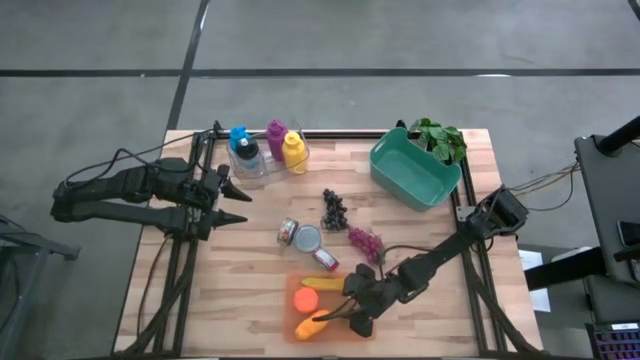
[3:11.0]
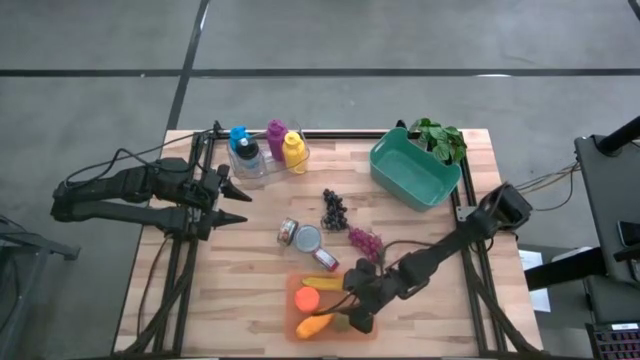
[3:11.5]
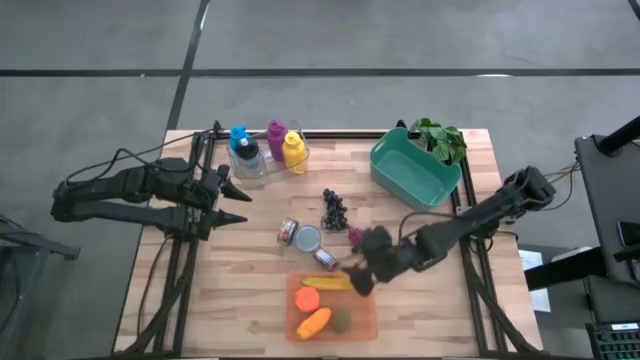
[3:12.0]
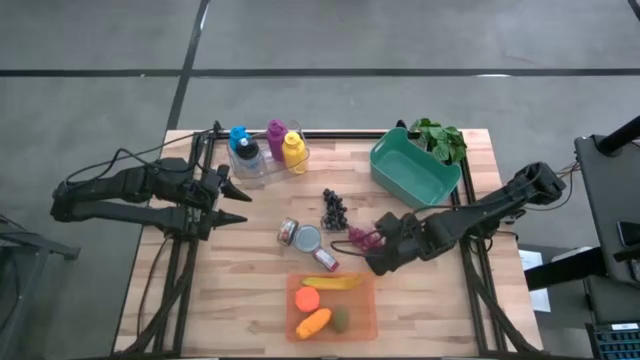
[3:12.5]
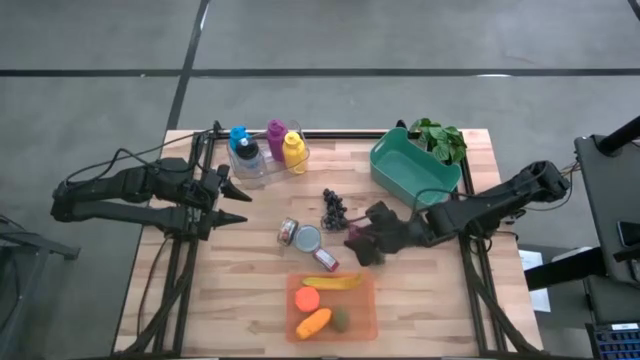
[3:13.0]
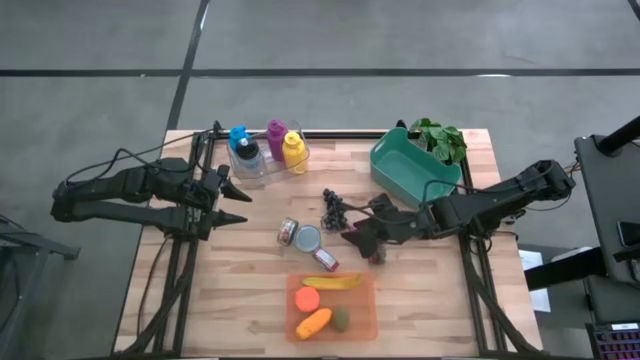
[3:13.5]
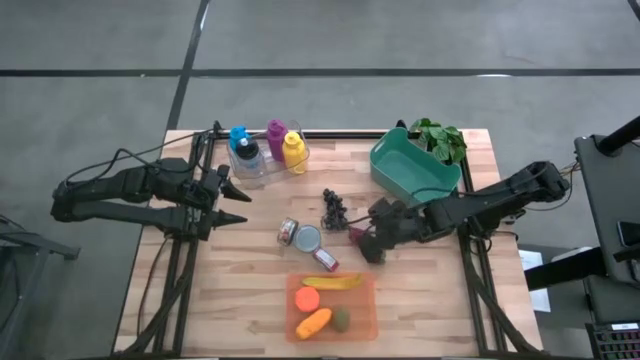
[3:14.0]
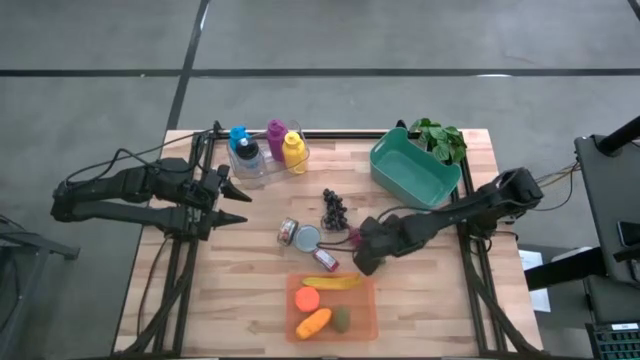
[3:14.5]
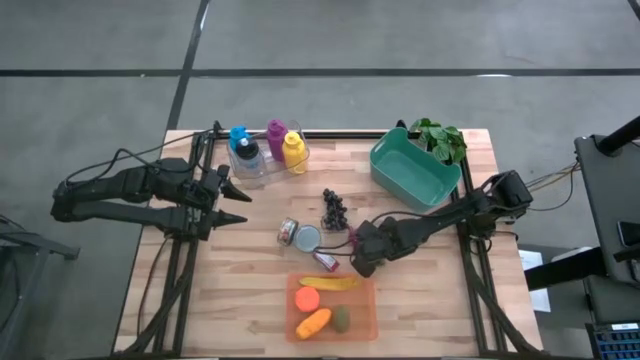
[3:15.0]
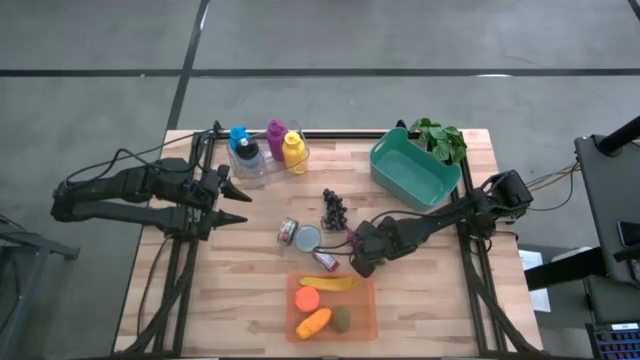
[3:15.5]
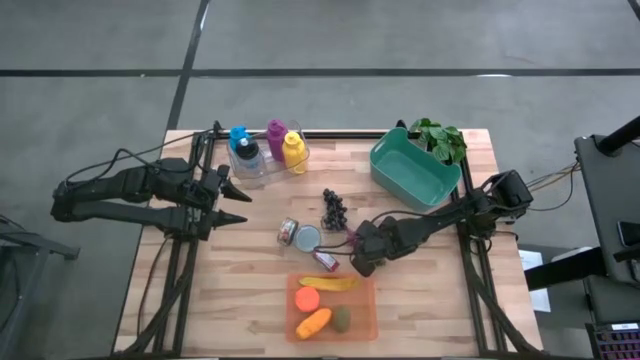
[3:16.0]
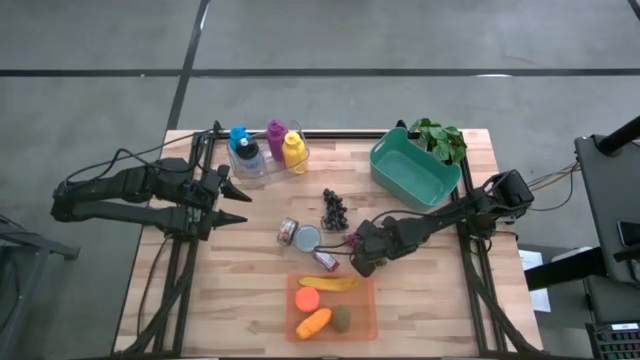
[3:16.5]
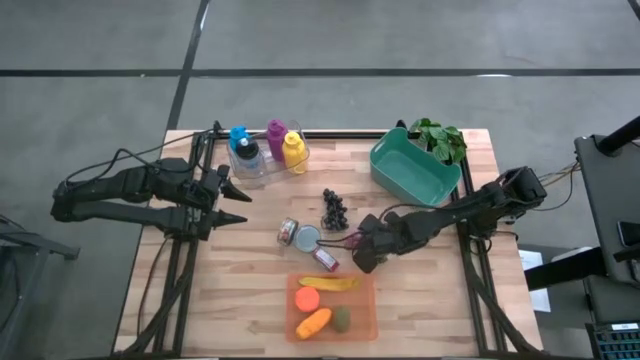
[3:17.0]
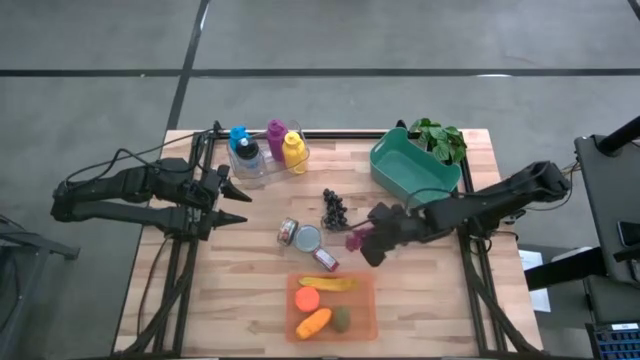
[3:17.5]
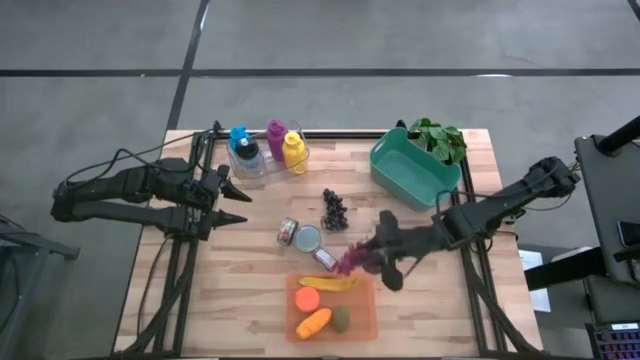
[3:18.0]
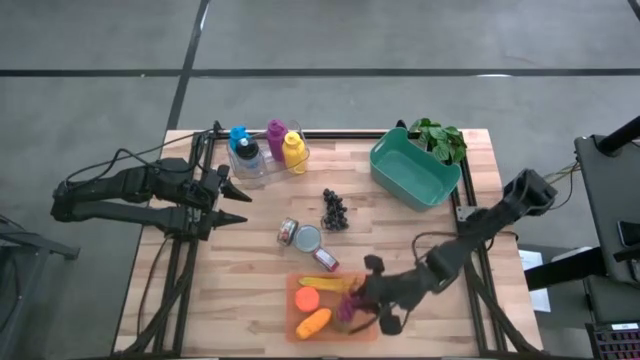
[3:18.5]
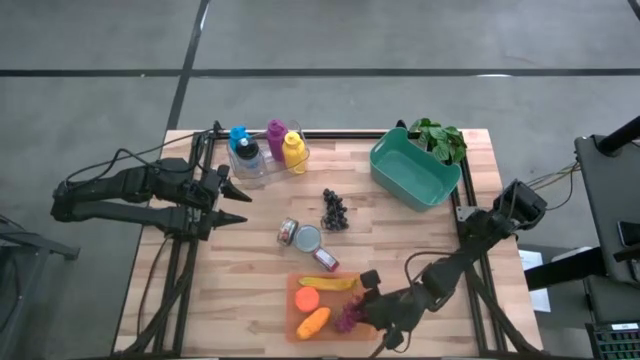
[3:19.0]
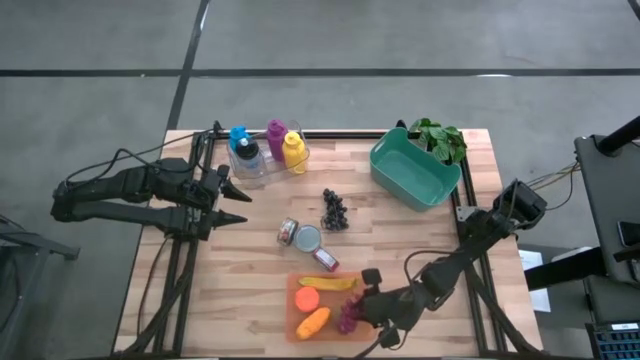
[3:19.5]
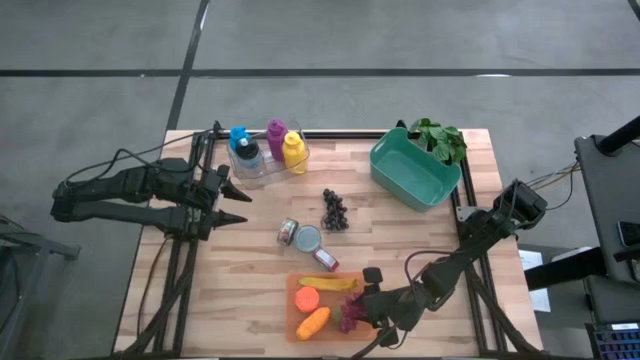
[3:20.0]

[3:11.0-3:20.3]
Task: Pick & Place Food Item
Put the pink grapes into the orange bin

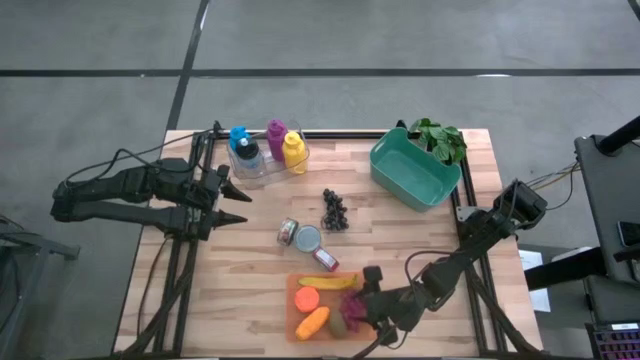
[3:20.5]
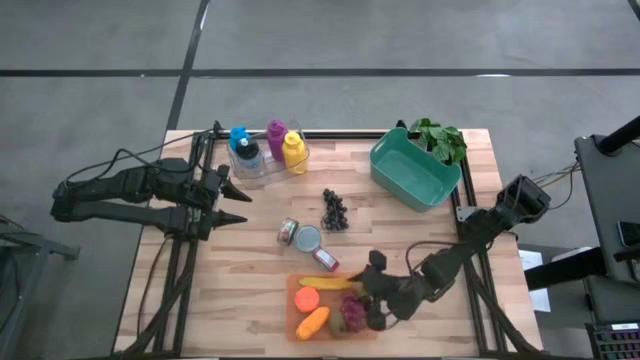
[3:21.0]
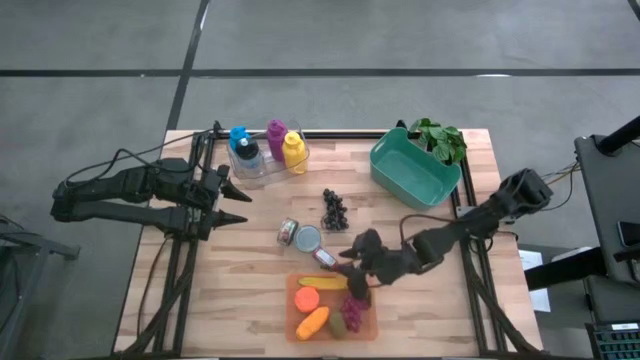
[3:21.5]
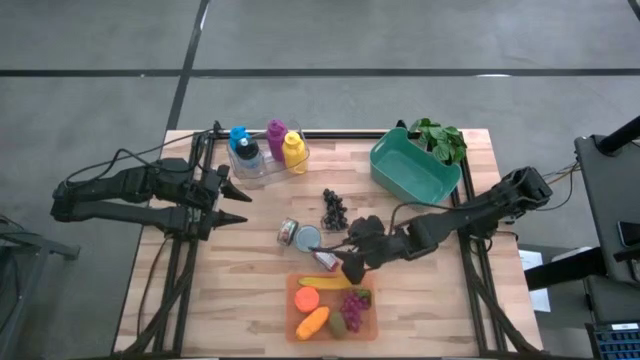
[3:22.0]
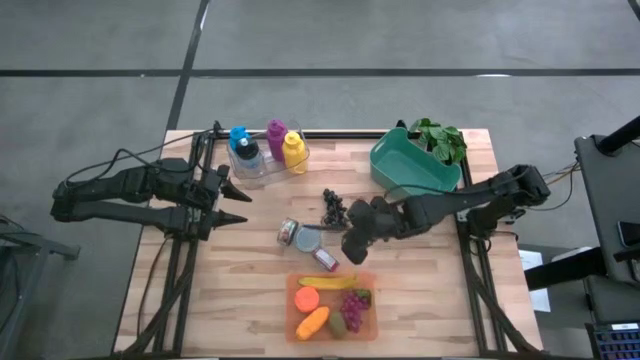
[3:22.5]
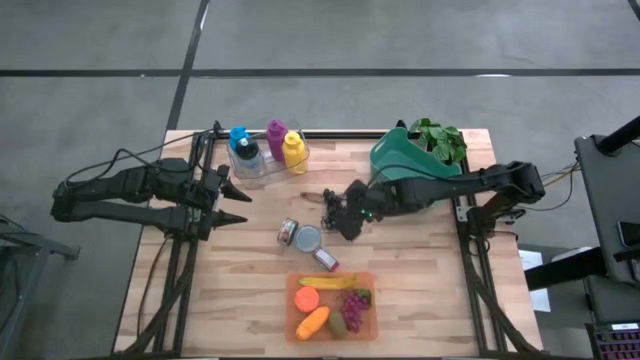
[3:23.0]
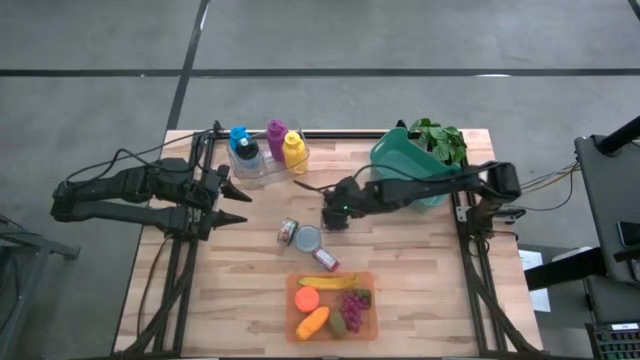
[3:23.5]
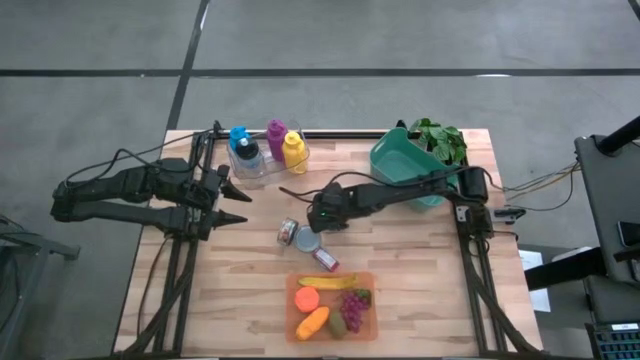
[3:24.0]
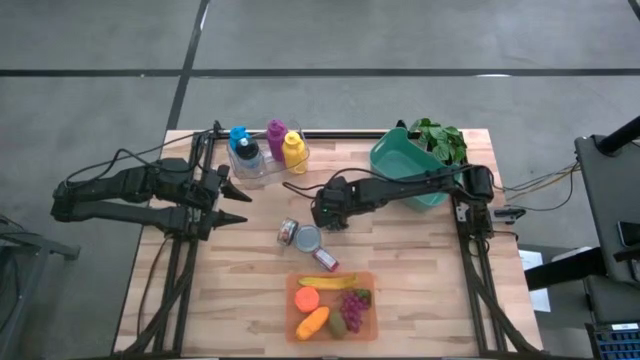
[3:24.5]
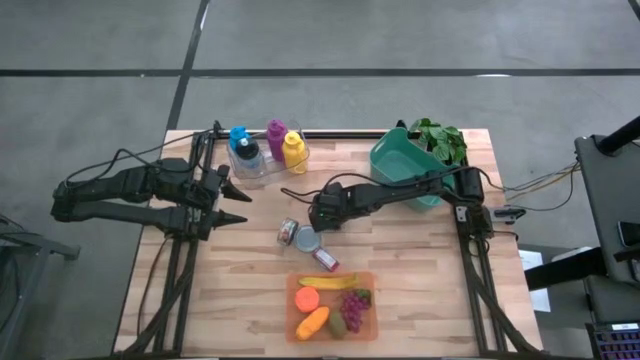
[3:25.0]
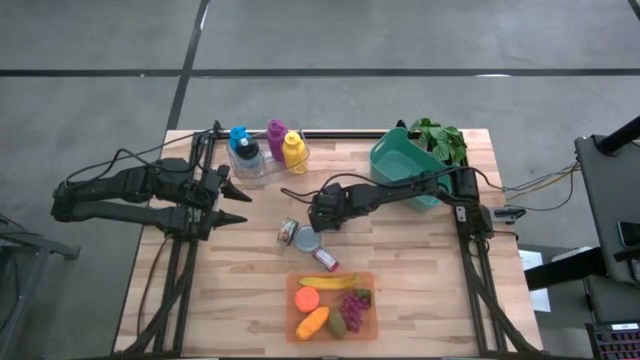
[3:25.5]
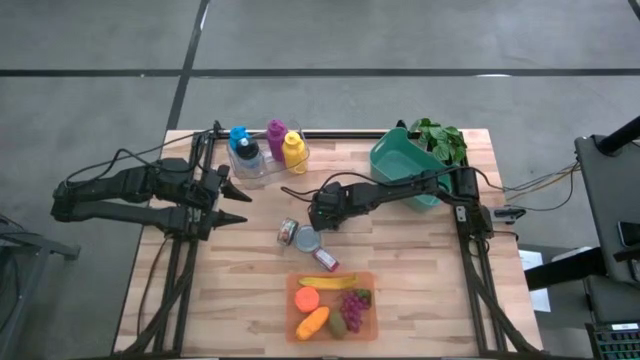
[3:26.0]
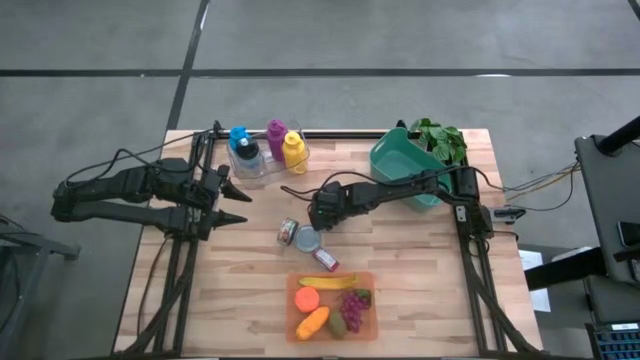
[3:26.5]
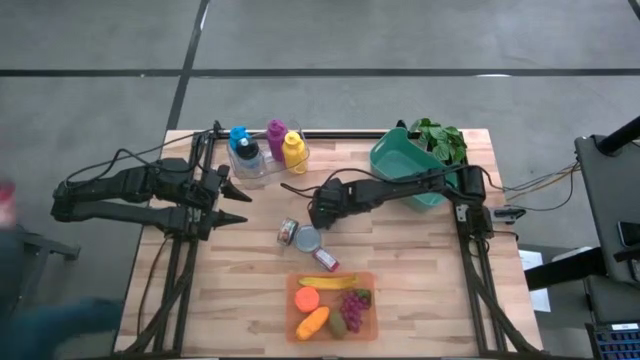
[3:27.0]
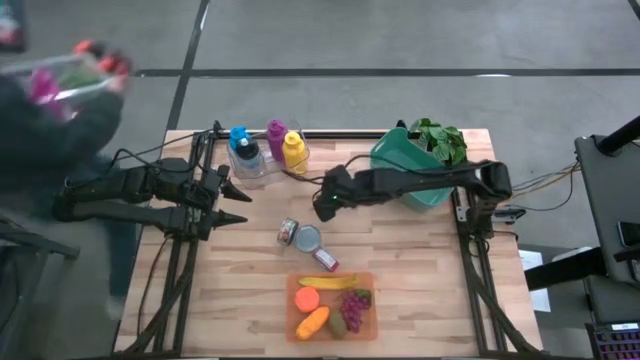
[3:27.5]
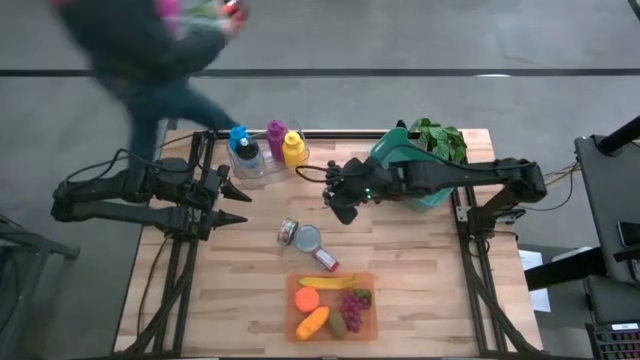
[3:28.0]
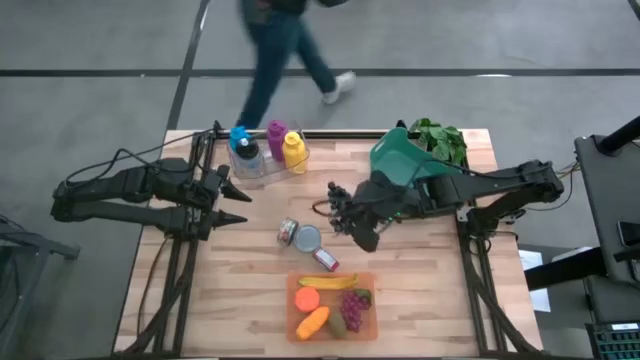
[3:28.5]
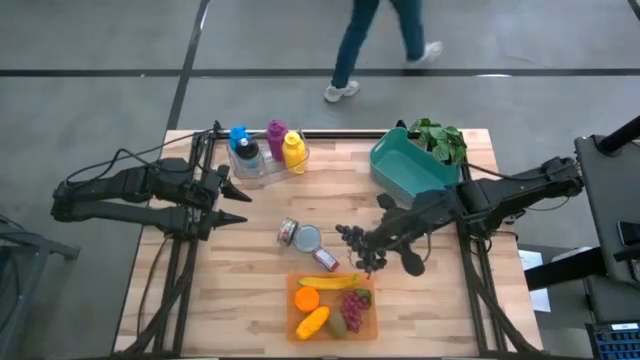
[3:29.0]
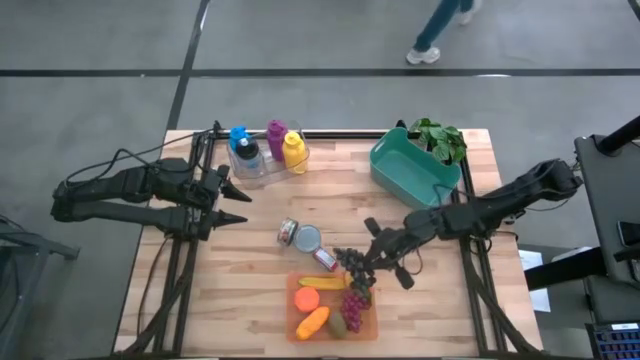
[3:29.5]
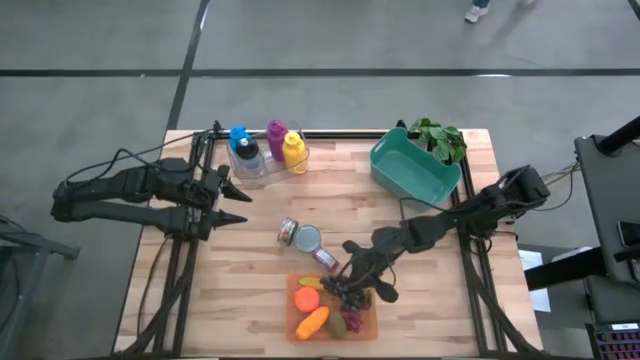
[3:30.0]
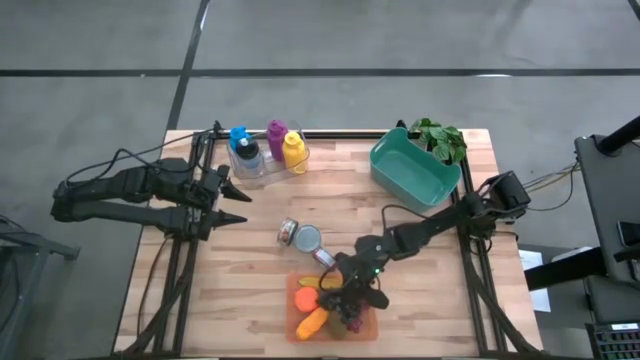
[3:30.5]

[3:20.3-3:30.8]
Put the black grapes into the orange bin
